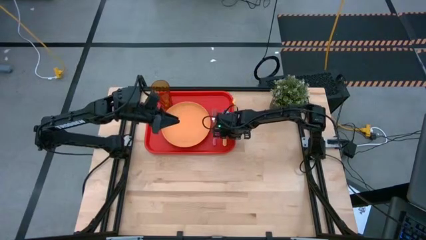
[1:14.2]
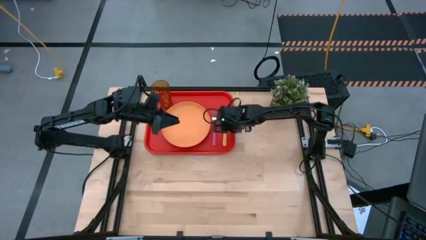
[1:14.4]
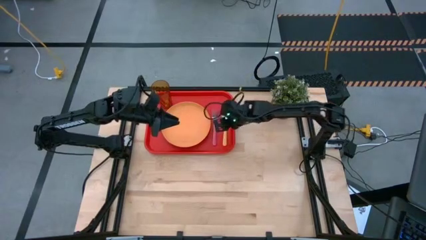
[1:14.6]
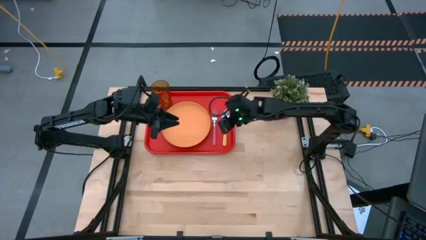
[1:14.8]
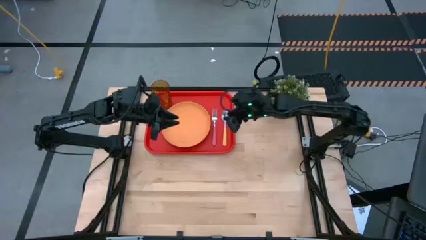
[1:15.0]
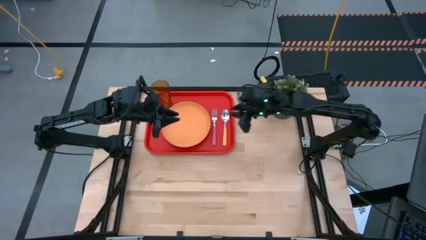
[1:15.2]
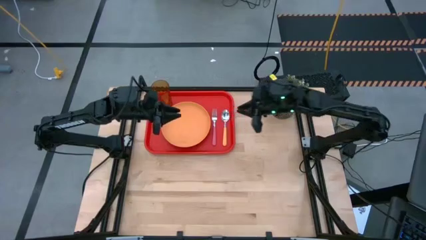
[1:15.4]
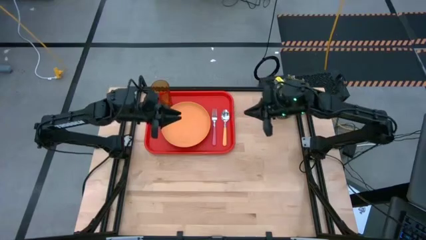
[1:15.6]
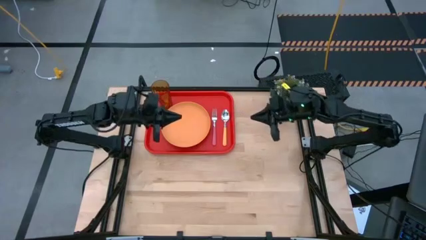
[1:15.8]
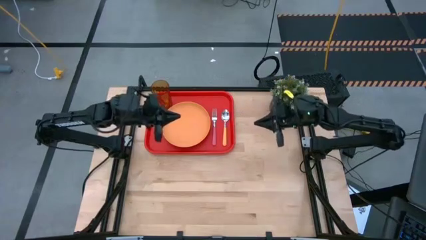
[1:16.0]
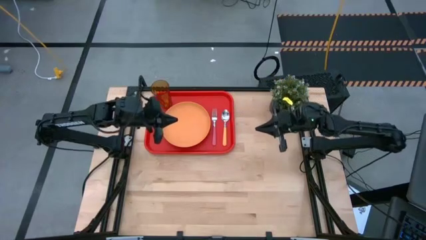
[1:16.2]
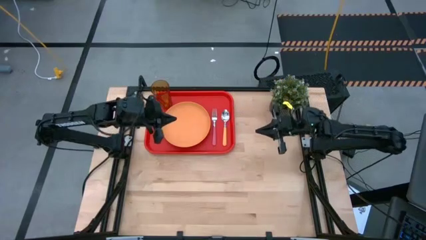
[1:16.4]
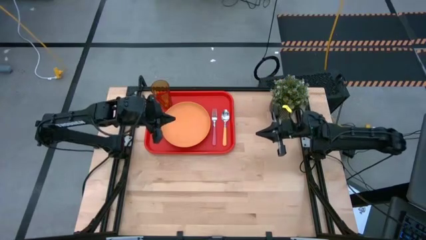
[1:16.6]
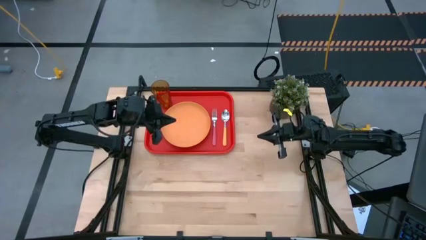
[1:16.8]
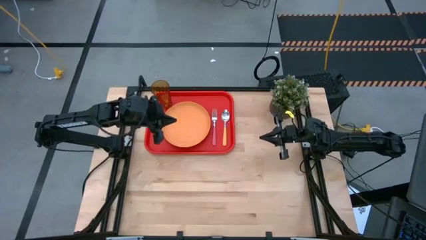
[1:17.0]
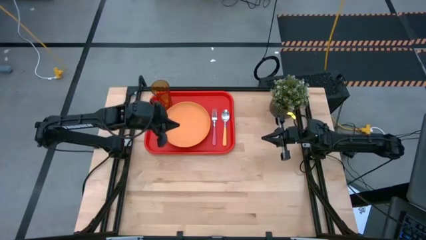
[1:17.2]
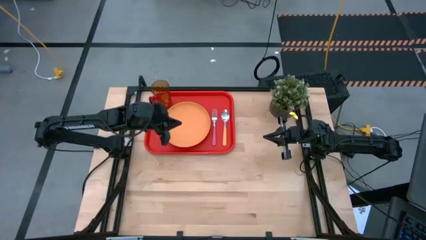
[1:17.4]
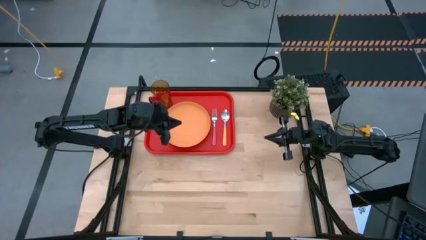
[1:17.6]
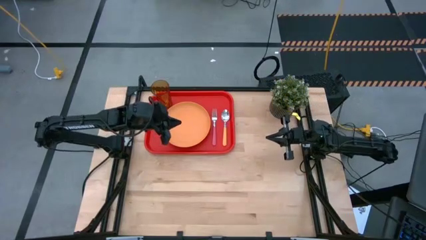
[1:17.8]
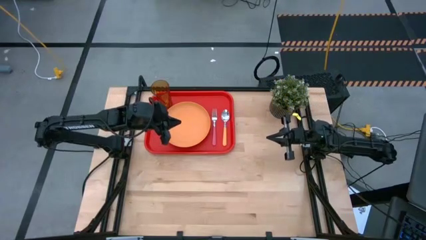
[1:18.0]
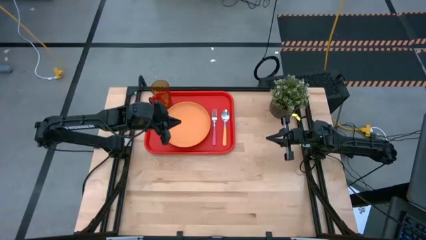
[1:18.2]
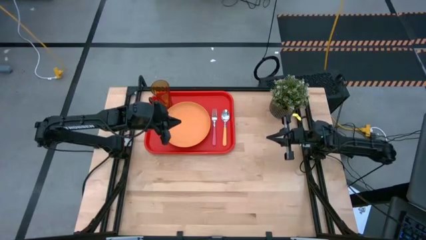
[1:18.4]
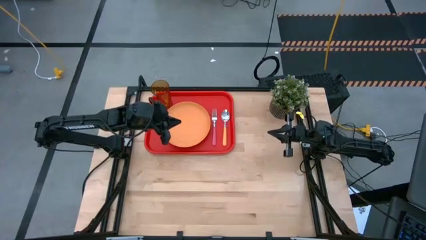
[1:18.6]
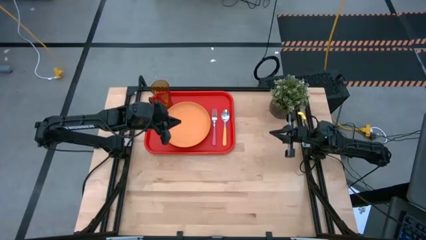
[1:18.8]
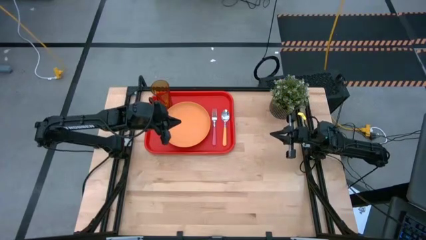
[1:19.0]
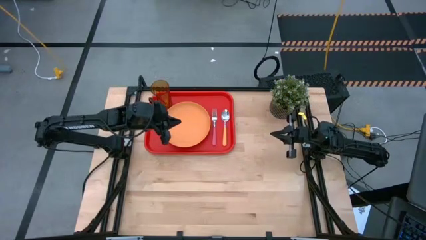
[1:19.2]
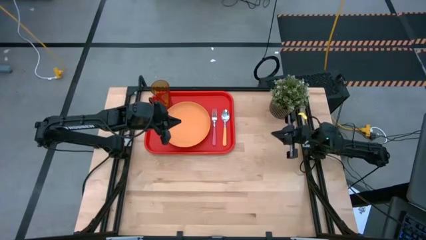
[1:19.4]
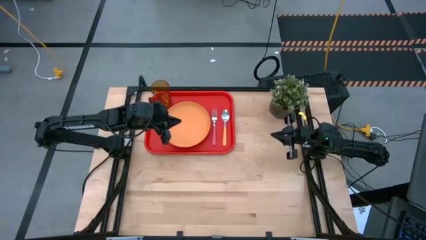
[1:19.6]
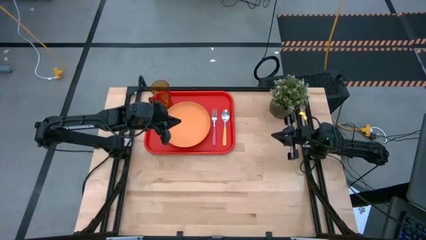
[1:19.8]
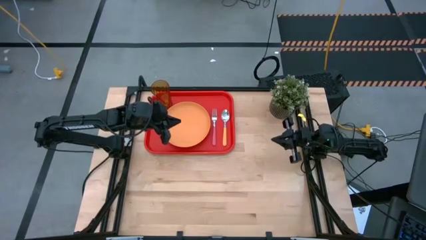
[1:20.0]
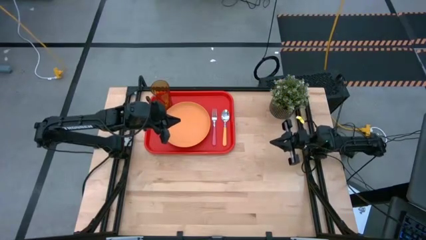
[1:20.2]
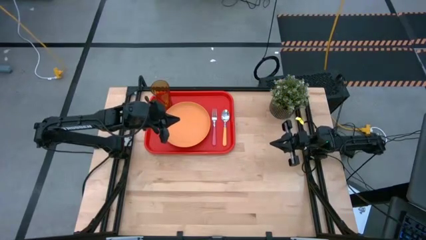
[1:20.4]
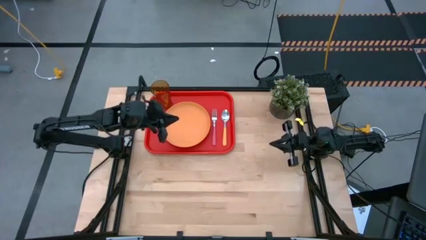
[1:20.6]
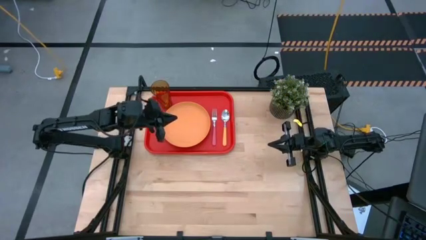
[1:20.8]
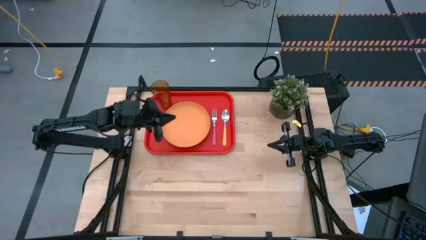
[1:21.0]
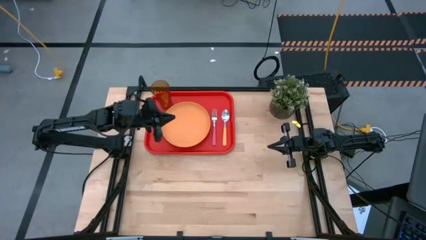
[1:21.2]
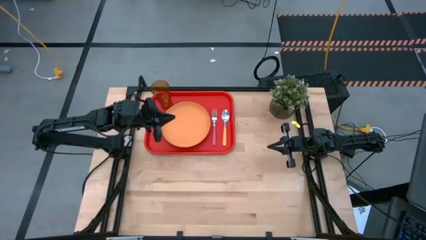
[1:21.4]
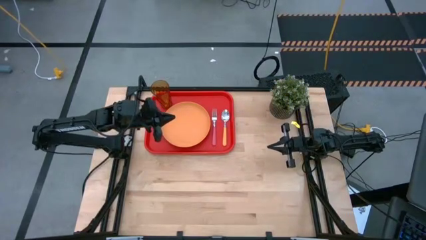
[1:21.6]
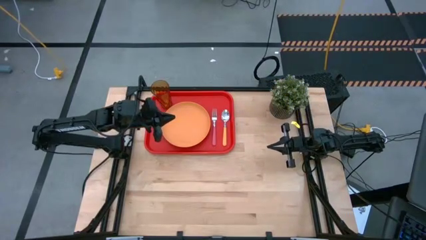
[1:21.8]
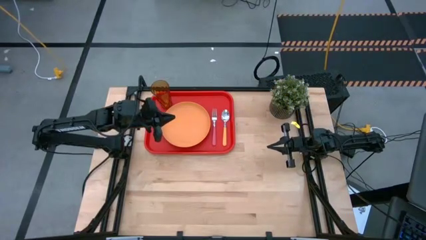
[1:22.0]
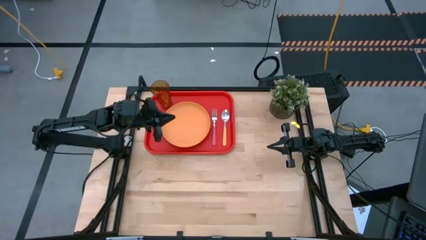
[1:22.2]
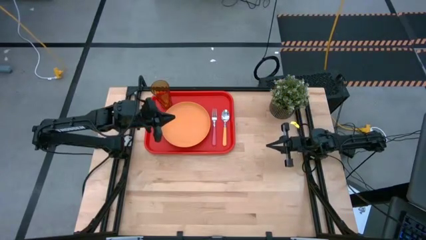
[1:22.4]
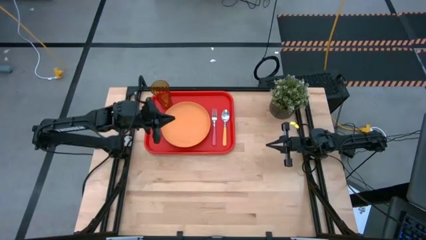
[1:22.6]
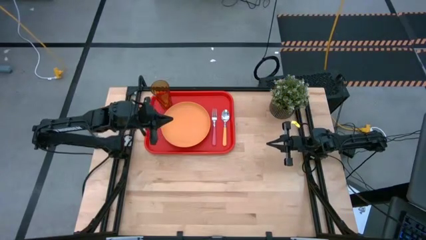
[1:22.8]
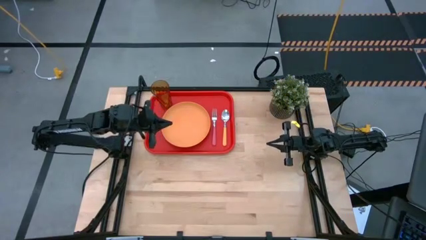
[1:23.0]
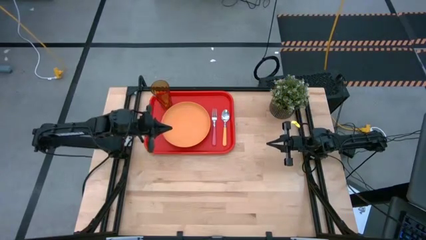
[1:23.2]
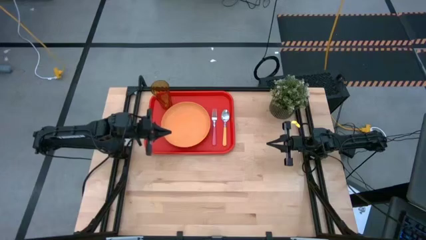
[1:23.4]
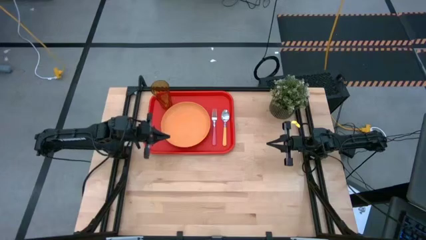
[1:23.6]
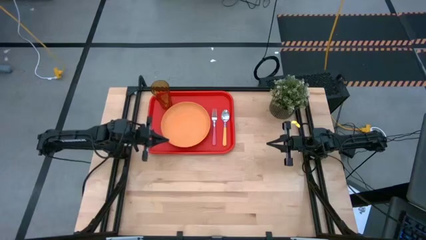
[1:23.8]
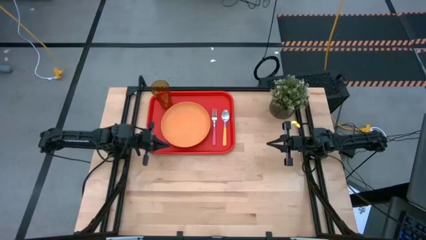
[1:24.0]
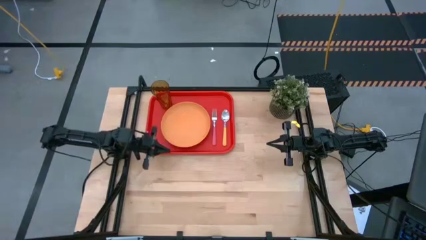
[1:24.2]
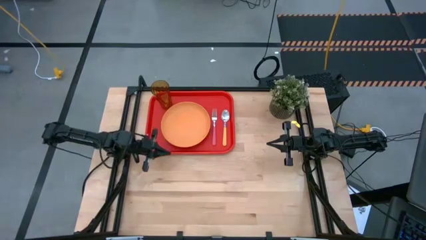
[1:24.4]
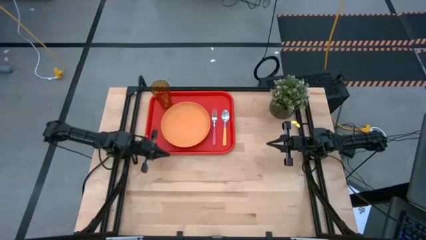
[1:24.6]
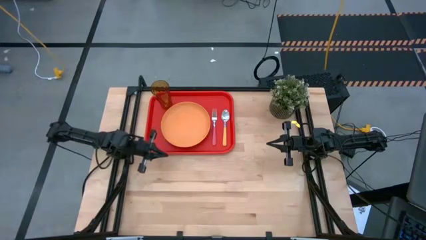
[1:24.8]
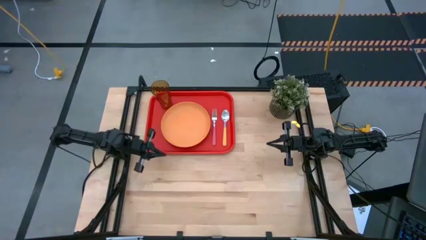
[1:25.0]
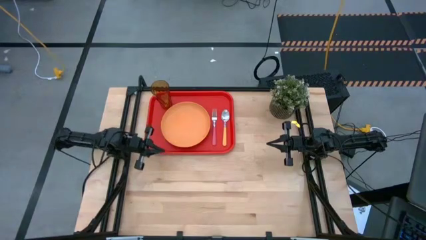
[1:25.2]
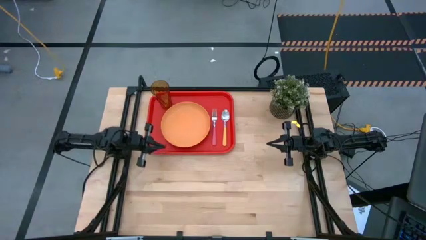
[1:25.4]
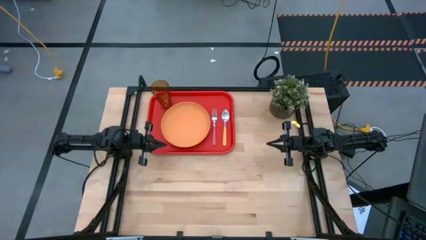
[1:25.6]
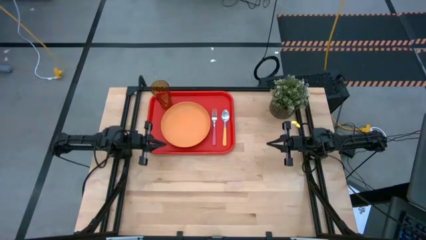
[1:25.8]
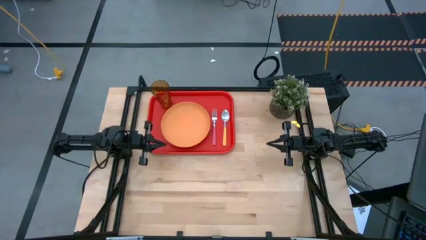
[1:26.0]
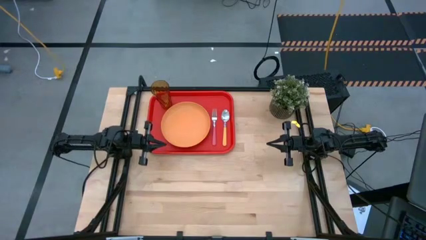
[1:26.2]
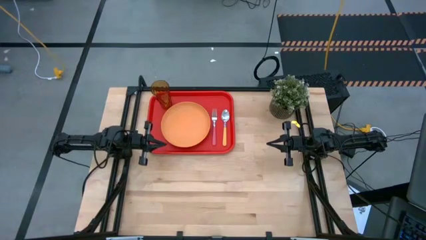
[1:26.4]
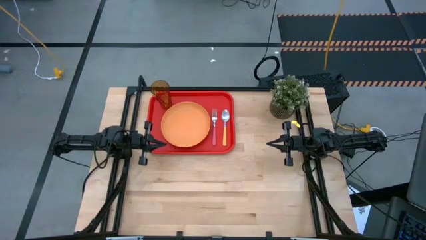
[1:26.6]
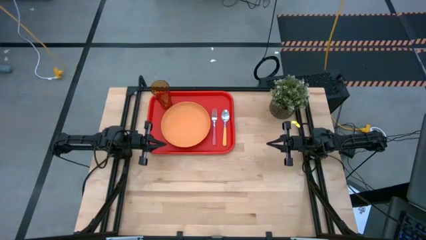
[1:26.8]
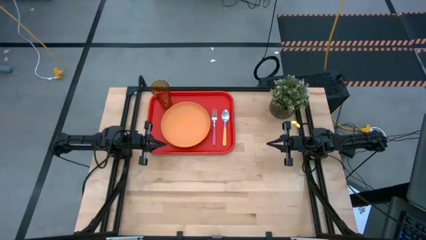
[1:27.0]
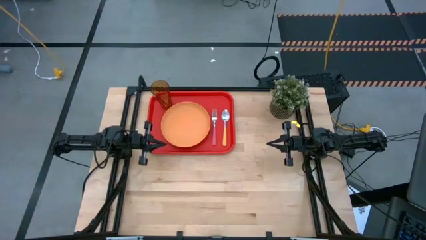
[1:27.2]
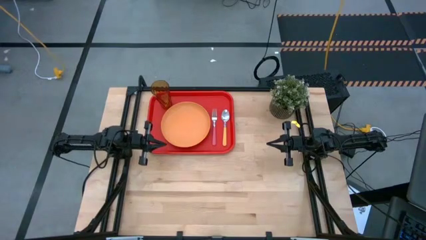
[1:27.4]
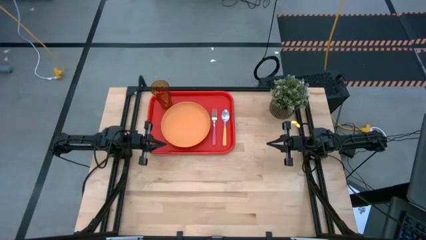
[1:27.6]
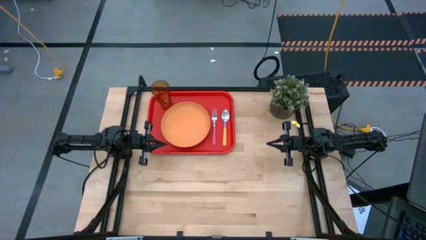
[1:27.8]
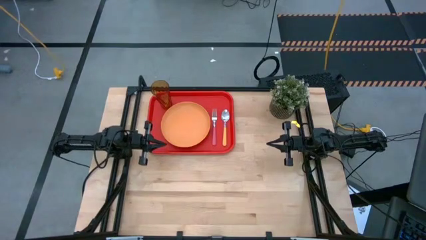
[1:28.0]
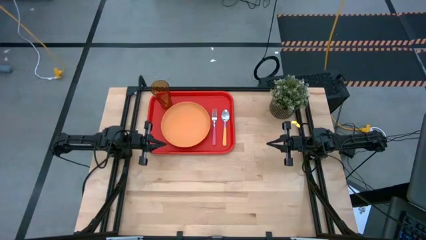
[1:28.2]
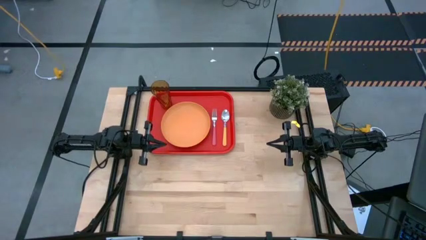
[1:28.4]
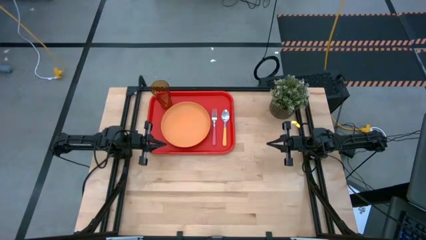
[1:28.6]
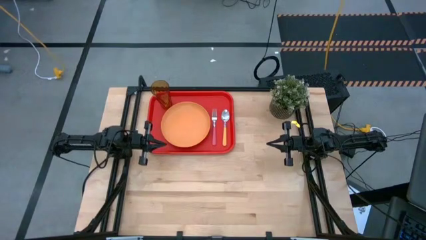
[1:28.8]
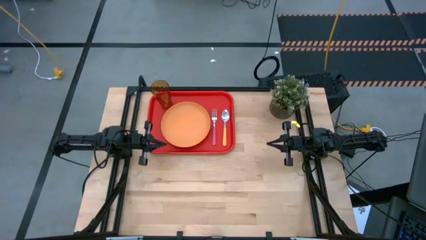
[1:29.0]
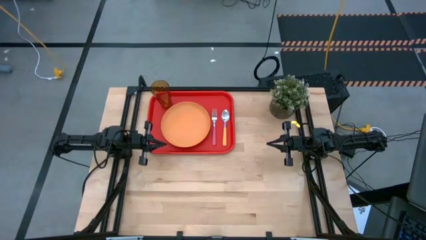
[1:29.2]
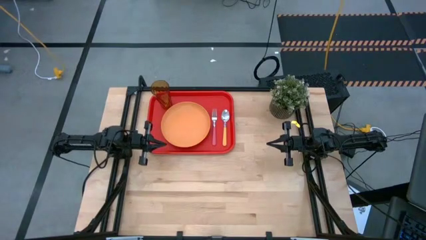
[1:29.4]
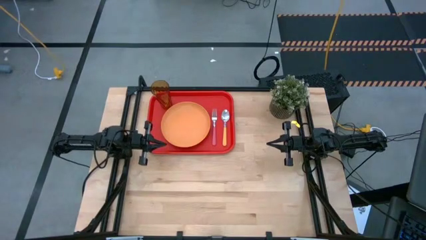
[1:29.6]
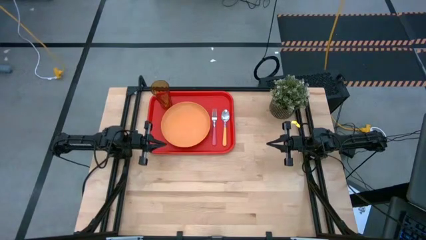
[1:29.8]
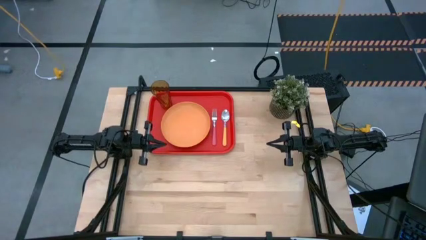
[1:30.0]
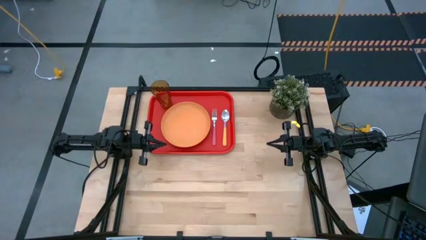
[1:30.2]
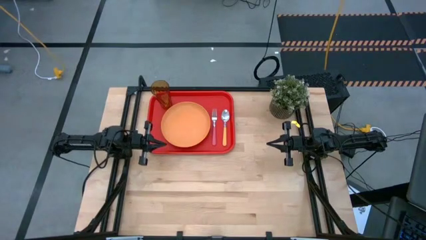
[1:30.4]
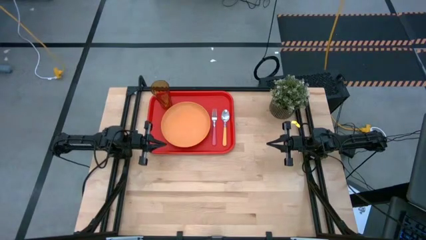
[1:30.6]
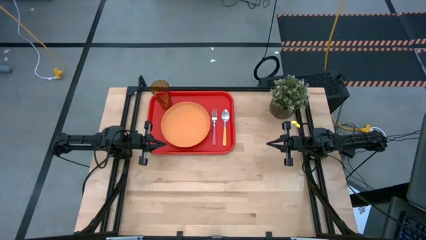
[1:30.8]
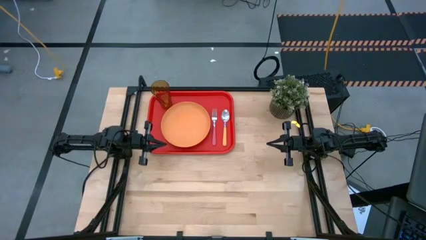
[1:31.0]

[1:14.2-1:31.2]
Task: Pick and place plate/cup/fork/spoon on tray
Return to Home Position
